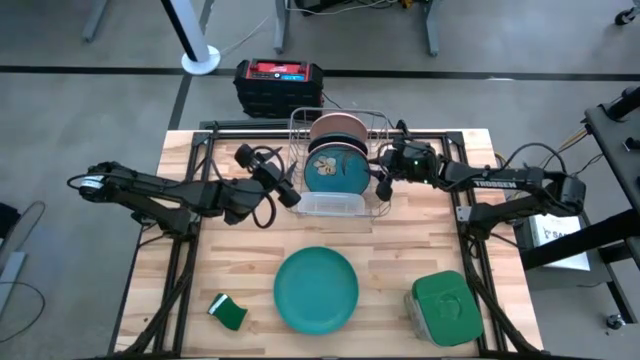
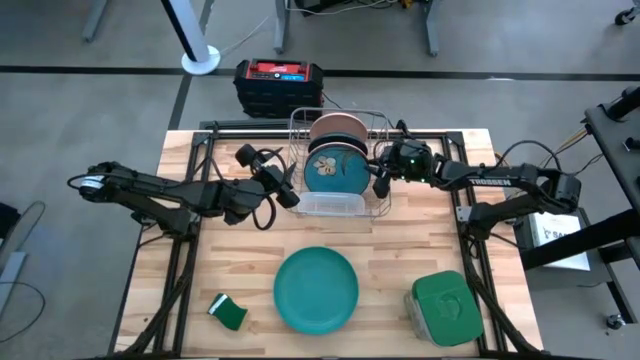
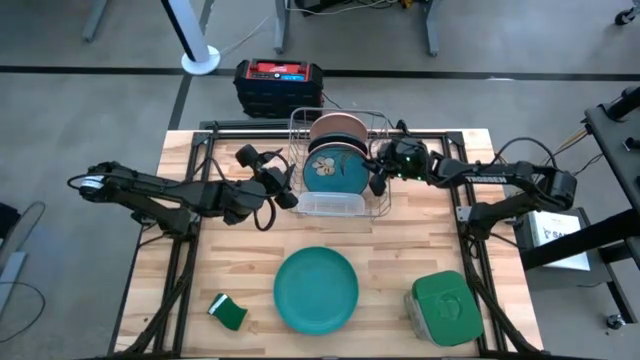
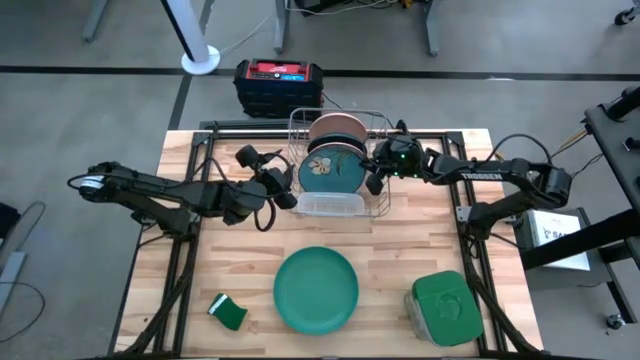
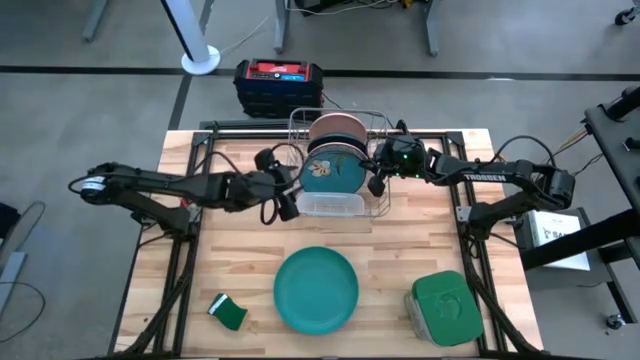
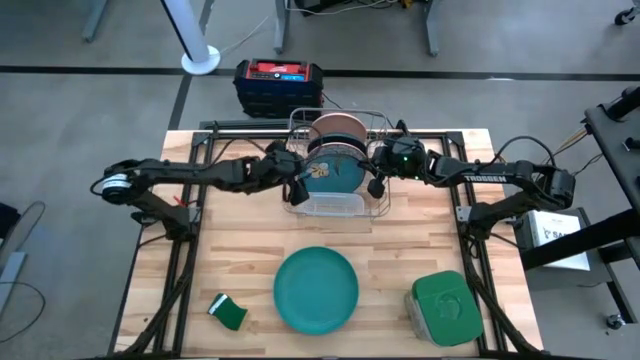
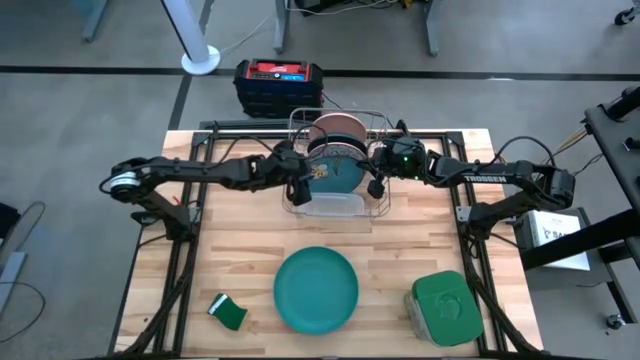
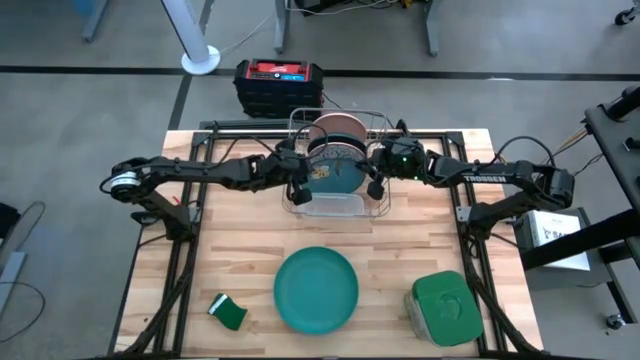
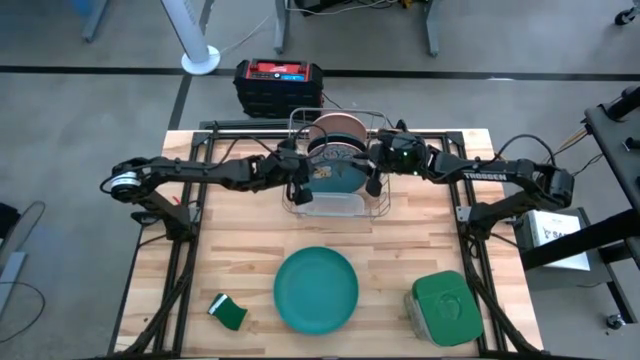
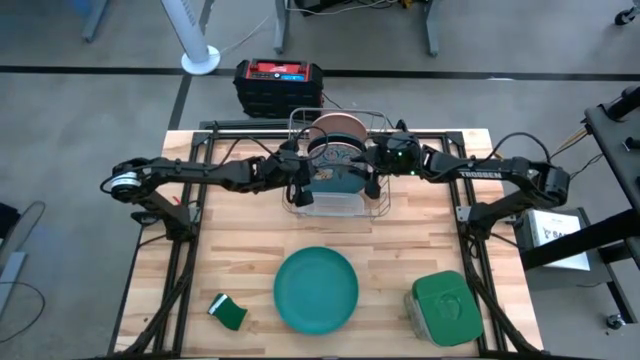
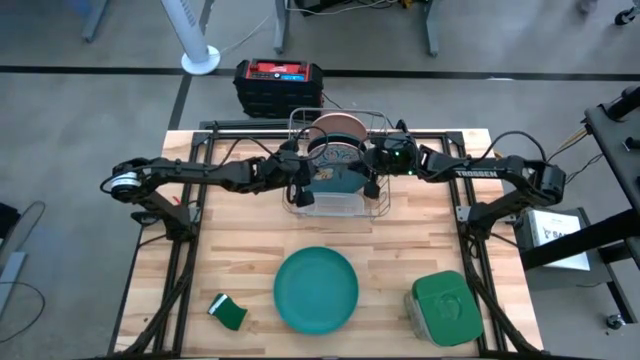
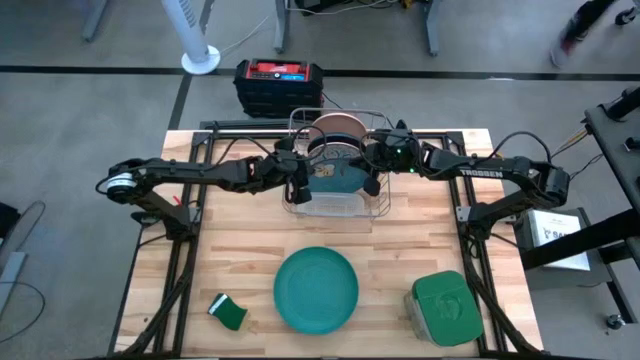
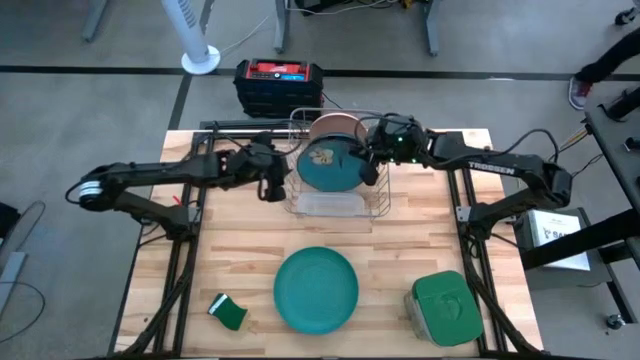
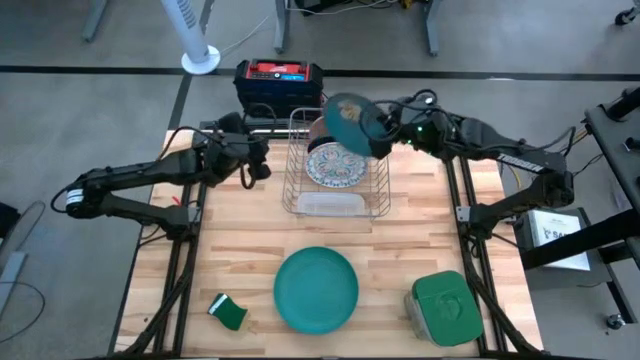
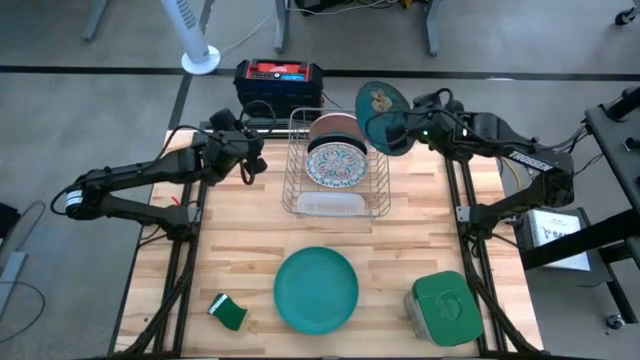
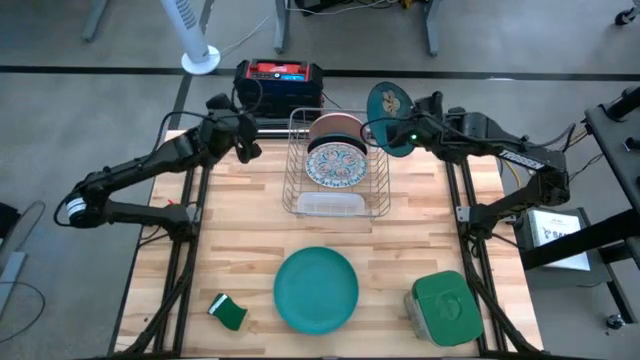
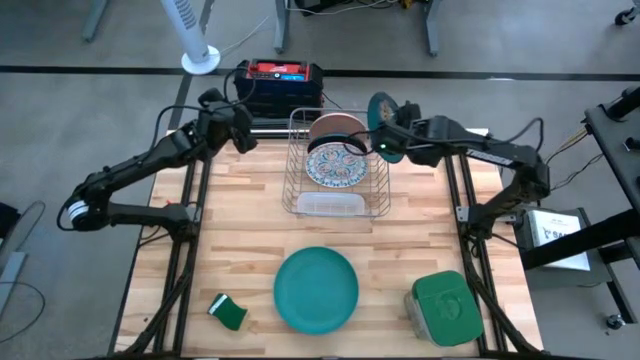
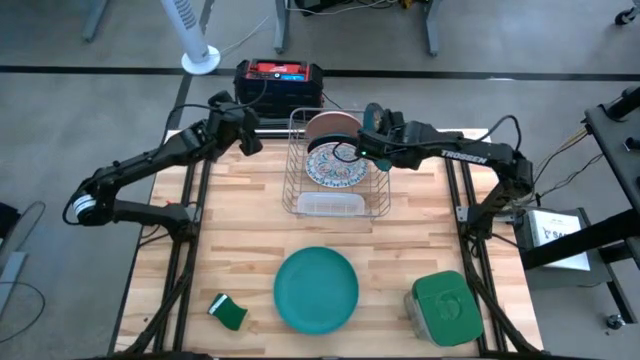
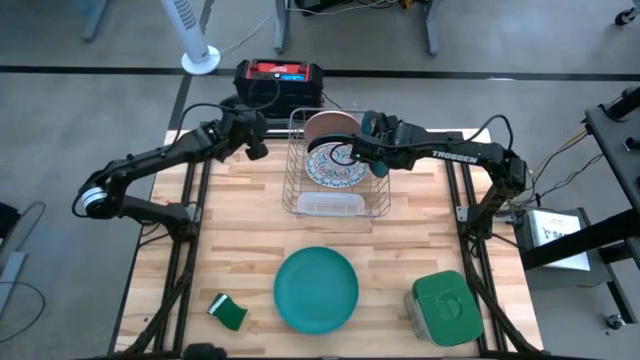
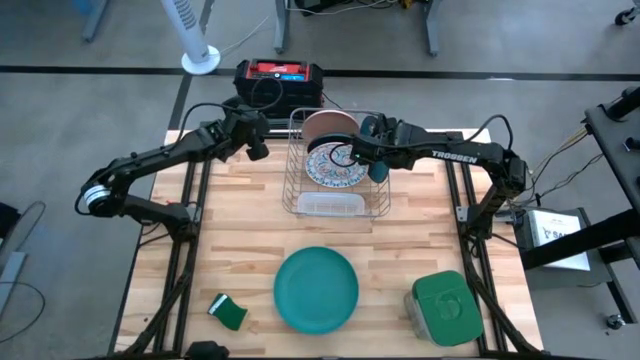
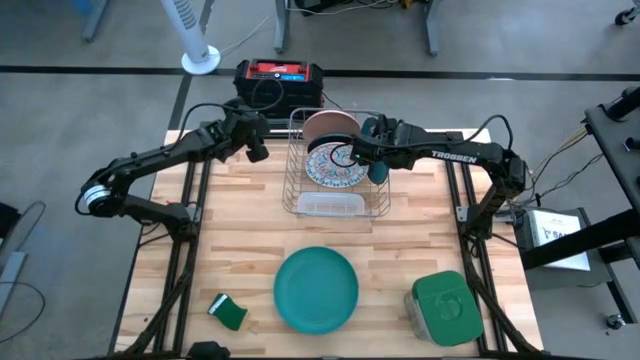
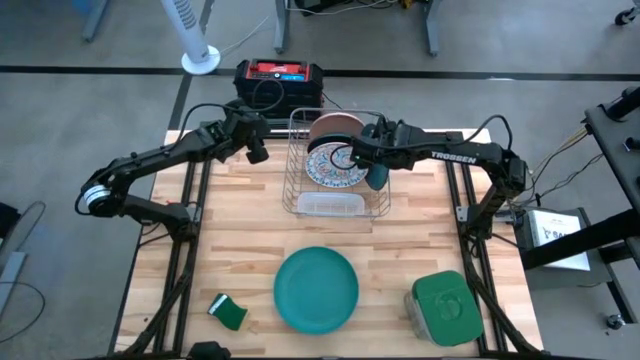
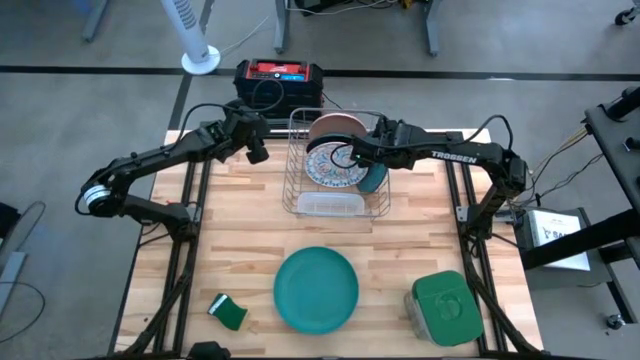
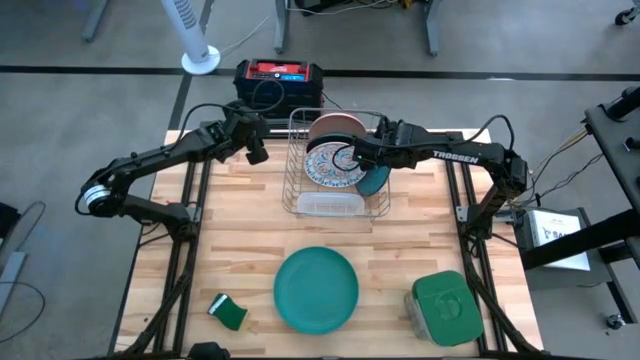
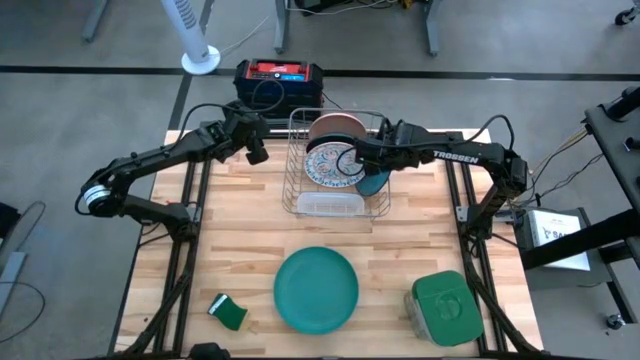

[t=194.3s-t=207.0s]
Task: Sort dishes
Put the blue plate in the dishwasher rack

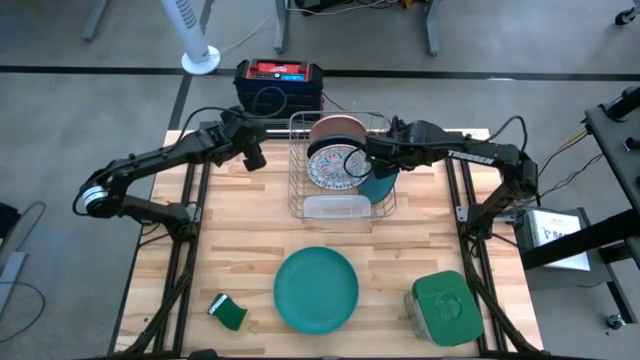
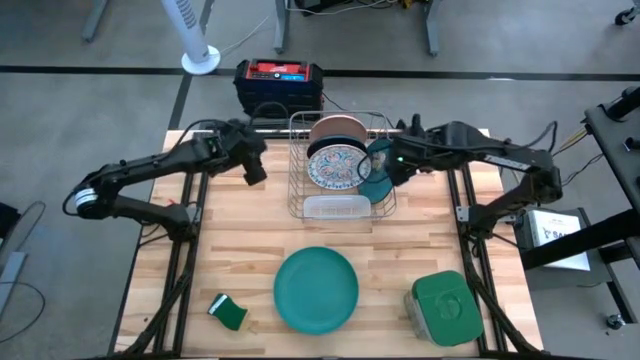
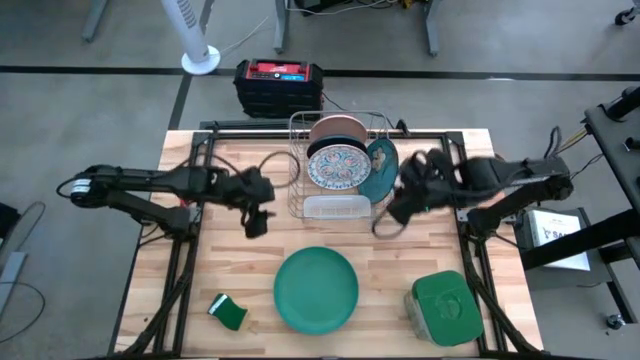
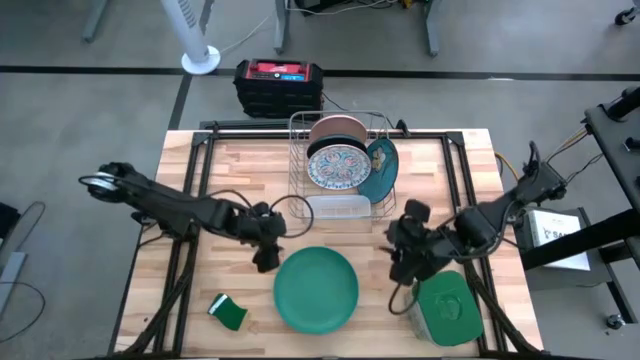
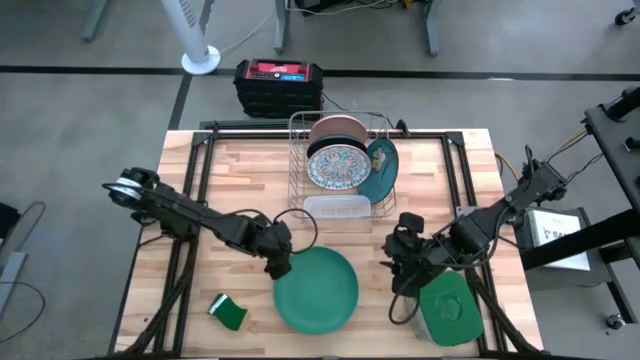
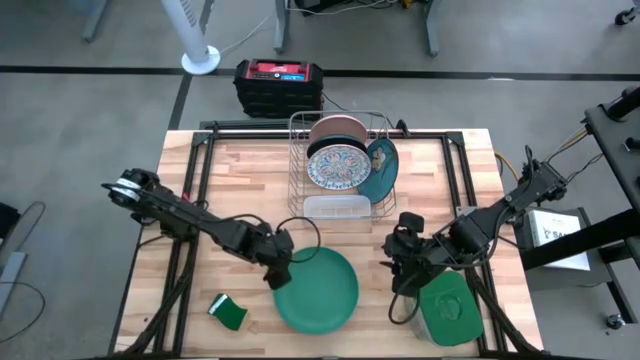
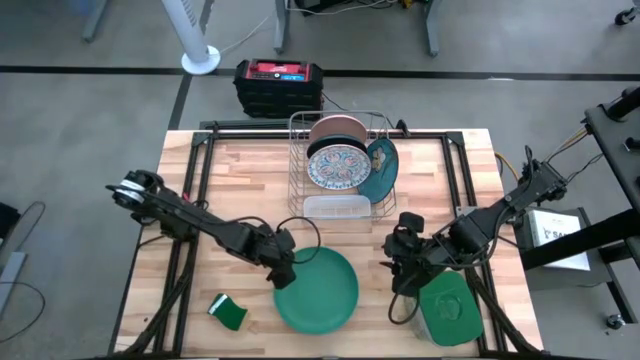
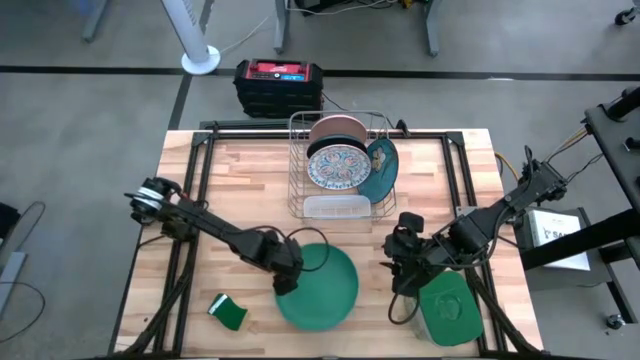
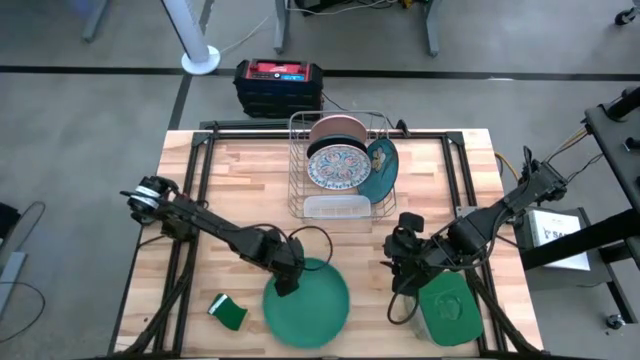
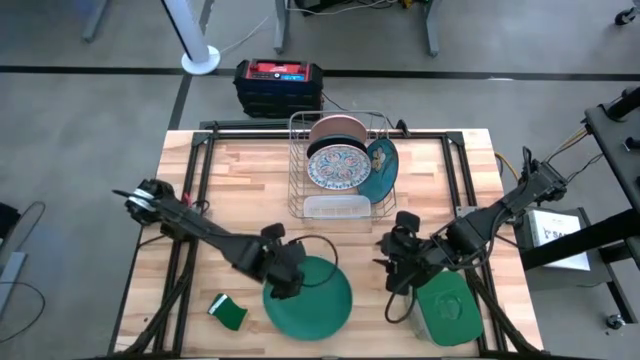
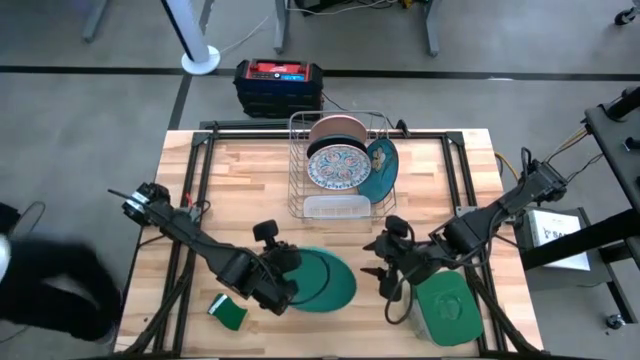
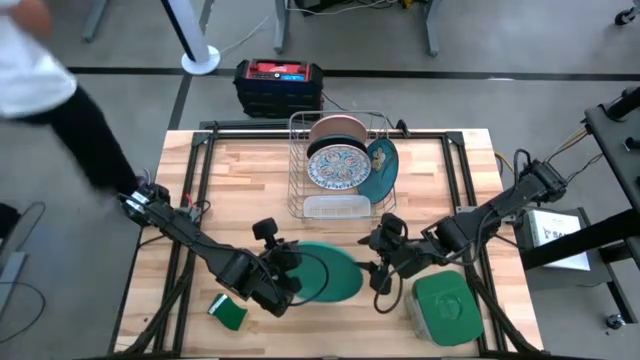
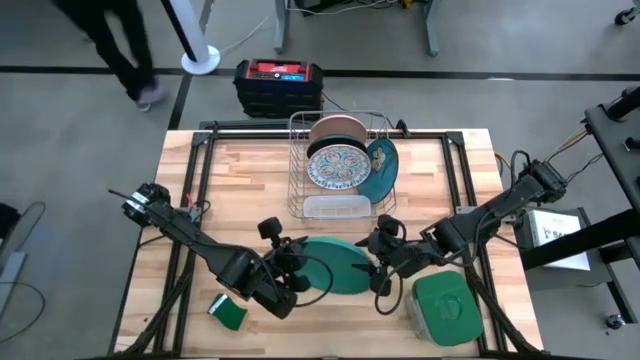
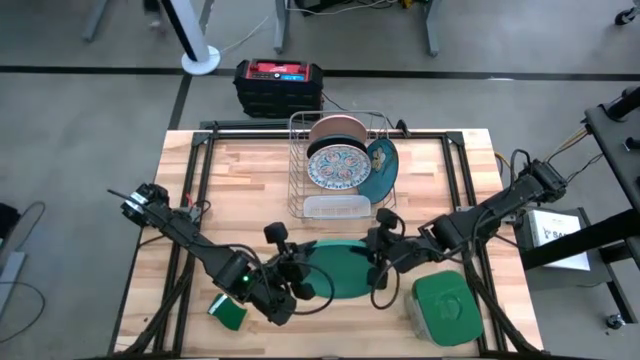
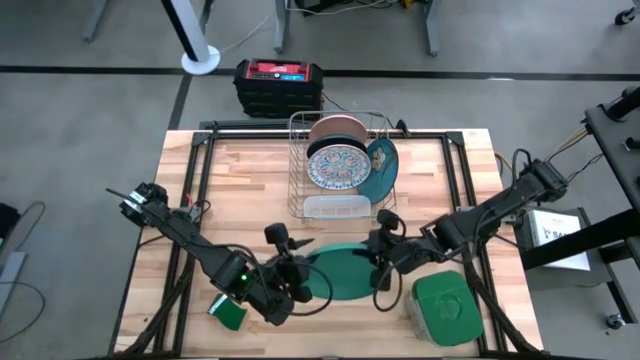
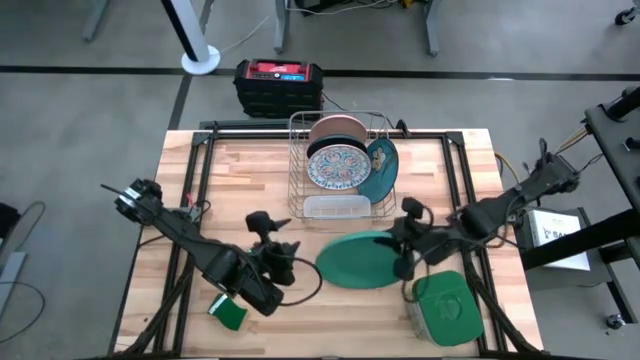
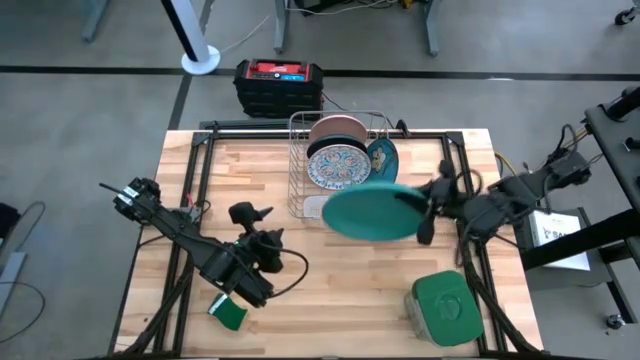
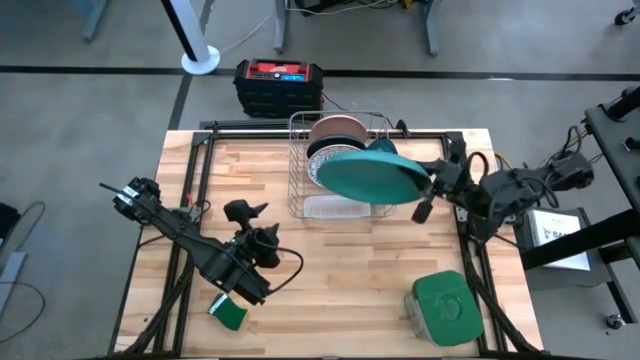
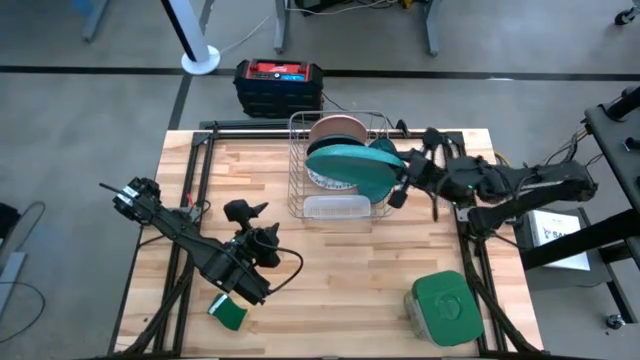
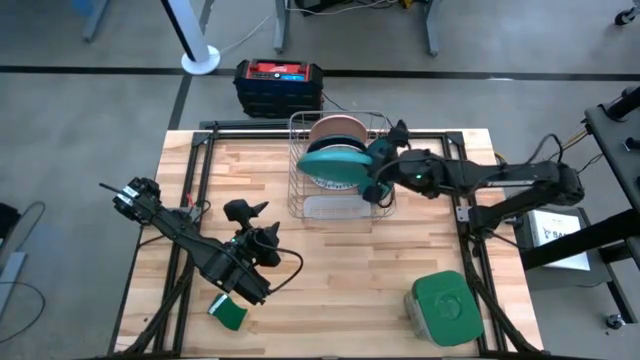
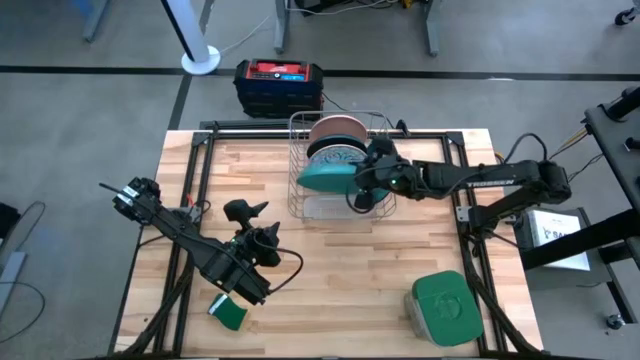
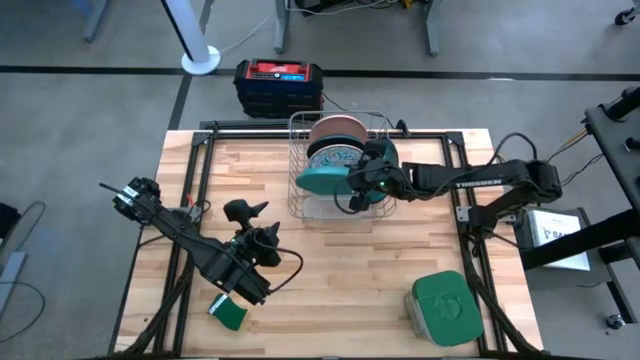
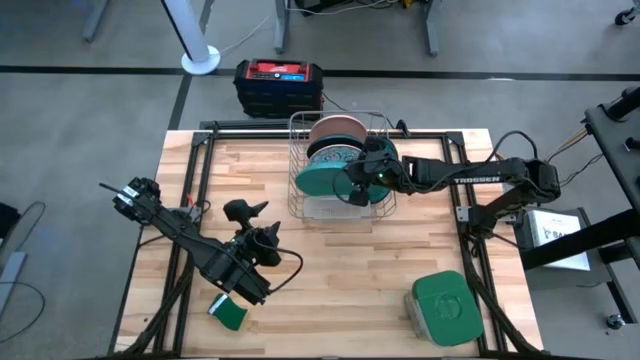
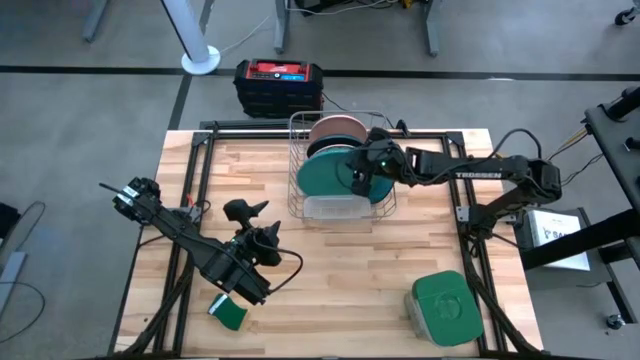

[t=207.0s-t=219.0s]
Put the green plate in the dishwasher rack
